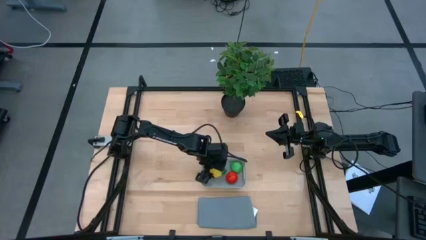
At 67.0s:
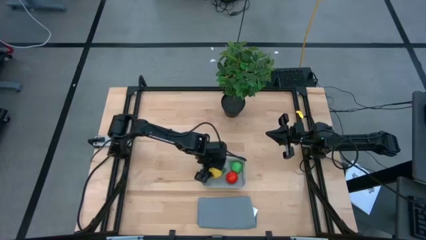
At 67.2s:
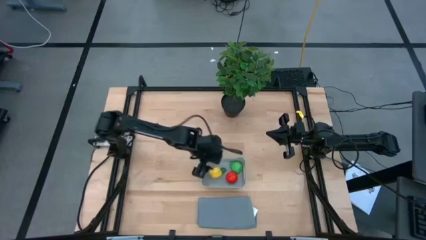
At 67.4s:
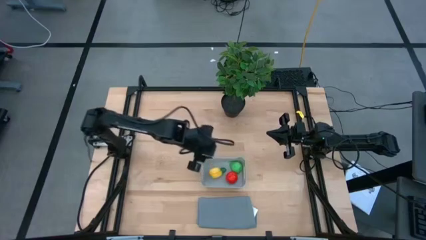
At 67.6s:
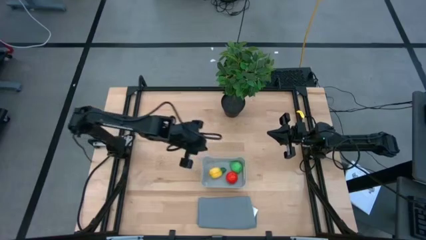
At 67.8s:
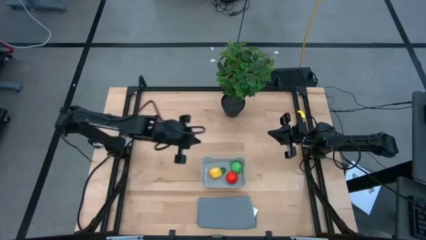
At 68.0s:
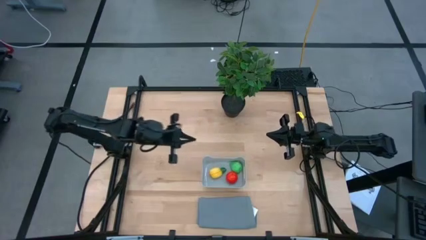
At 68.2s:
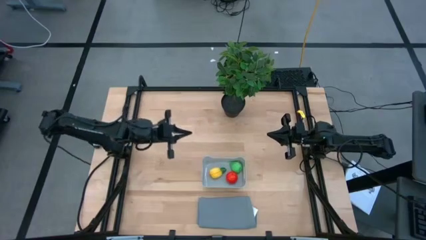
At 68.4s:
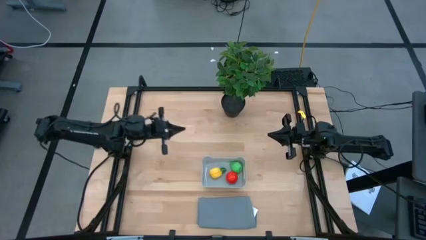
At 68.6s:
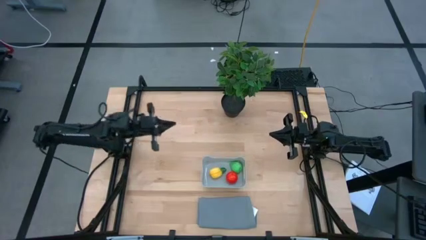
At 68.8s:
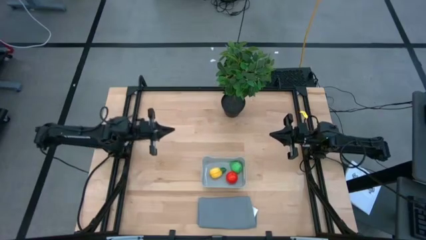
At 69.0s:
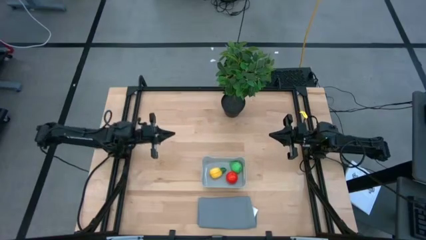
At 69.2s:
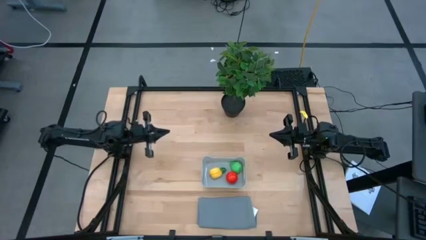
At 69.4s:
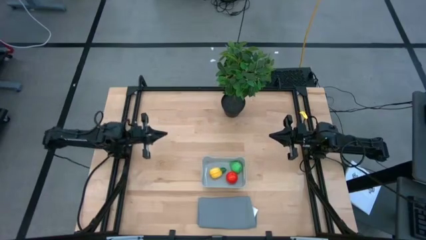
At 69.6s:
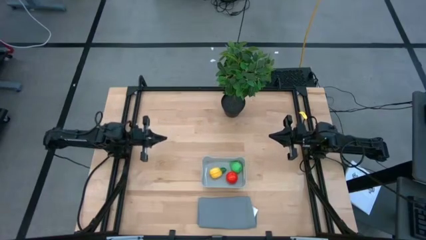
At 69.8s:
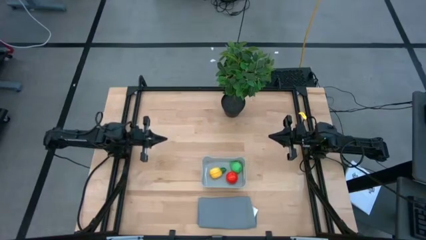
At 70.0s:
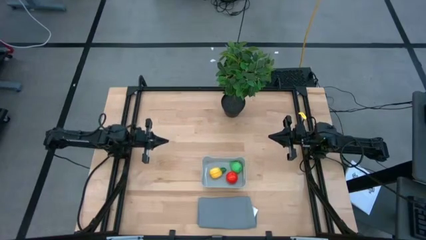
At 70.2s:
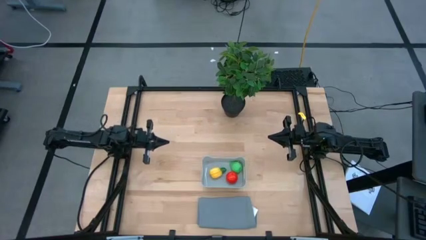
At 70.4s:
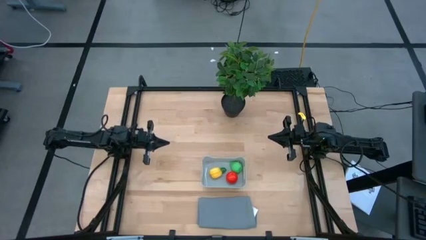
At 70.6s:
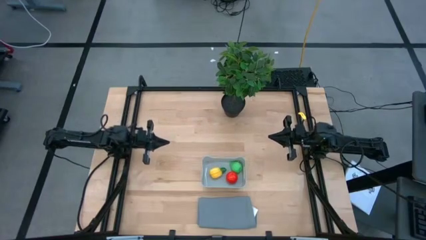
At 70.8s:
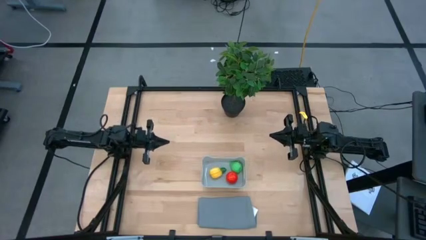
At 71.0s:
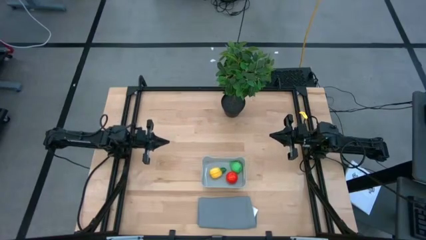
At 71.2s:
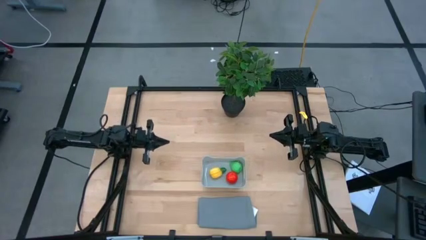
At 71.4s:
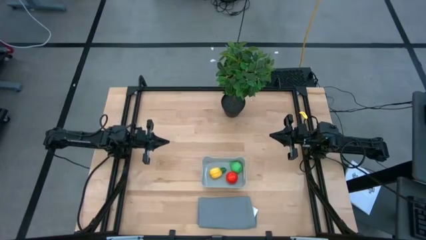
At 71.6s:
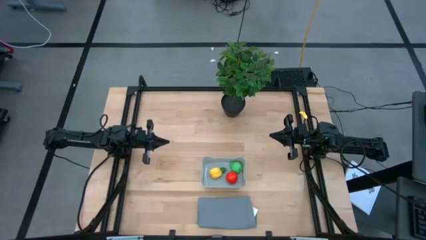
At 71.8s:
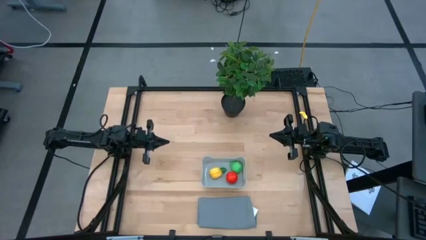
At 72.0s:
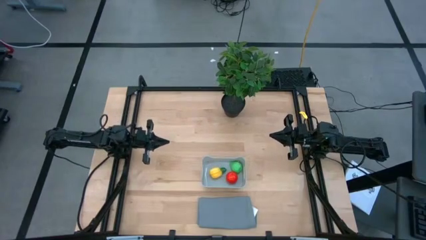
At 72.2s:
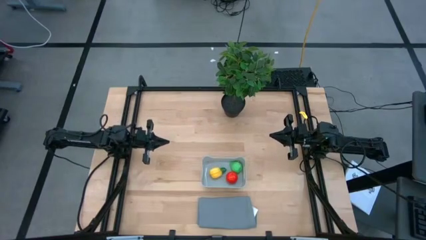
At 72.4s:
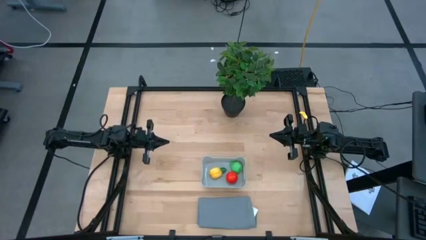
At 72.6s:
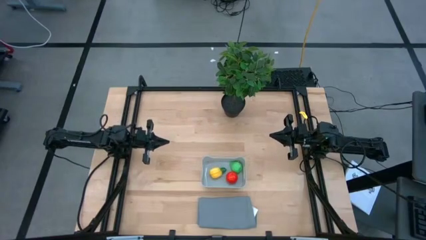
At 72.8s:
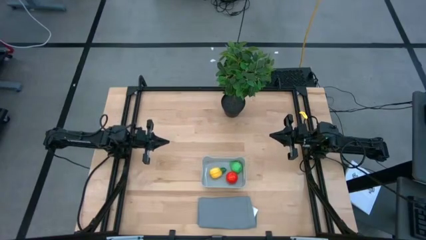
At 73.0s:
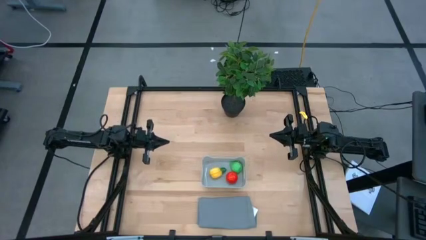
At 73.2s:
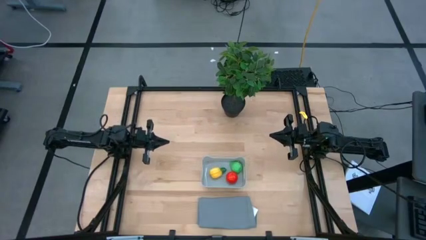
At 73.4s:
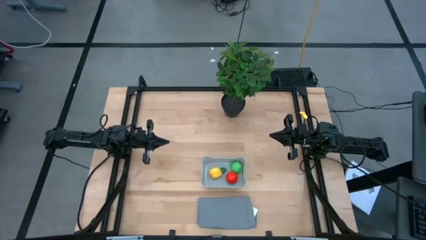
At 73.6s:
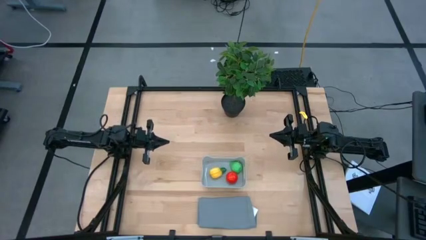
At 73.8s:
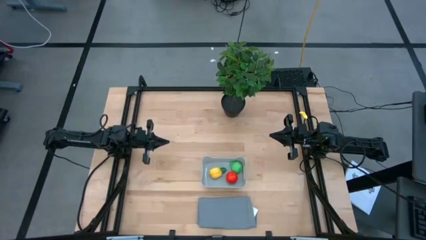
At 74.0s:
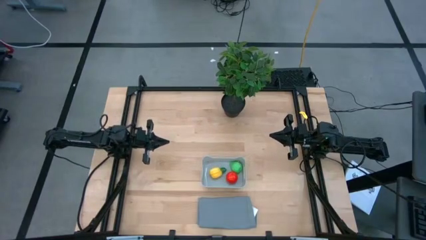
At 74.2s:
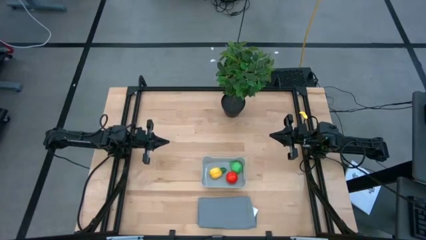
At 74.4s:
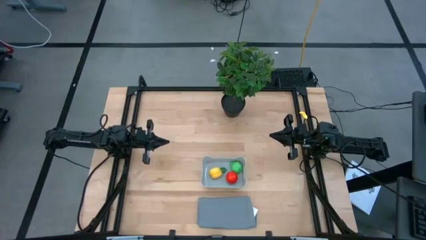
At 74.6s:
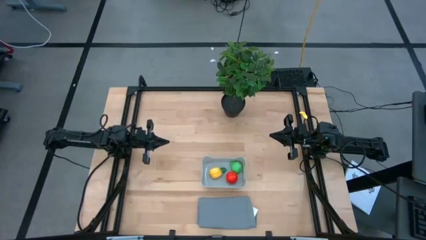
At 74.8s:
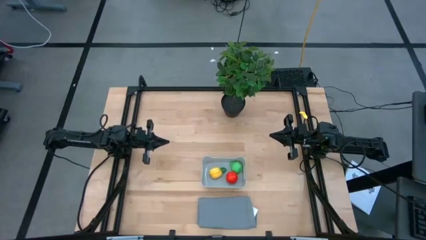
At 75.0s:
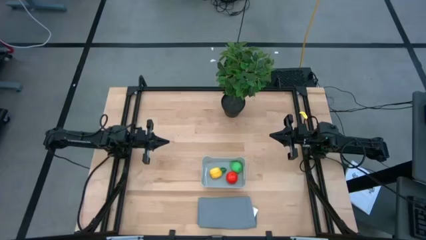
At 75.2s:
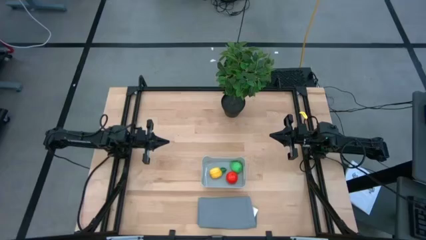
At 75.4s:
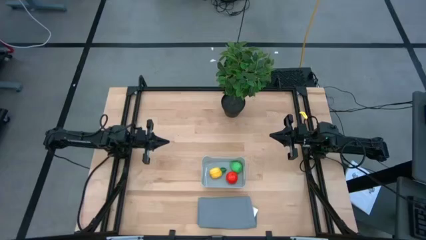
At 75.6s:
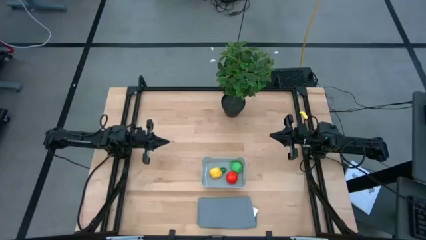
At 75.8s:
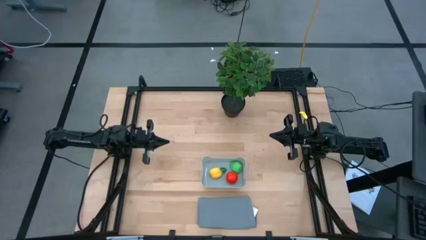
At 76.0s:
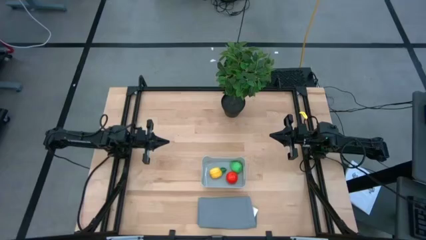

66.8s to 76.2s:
Task: Pick and placing Produce into tupperware
Return to Home Position

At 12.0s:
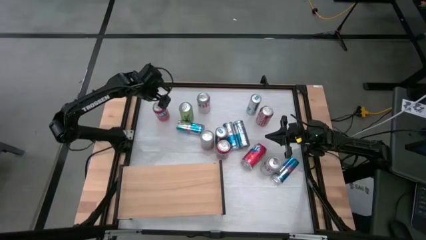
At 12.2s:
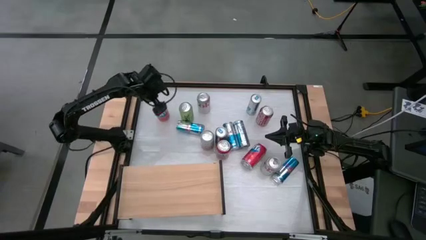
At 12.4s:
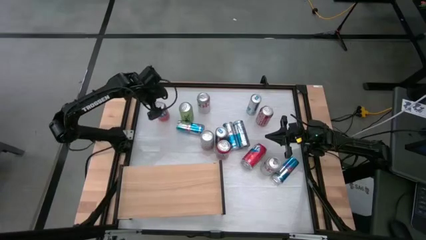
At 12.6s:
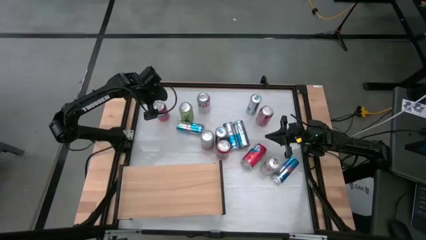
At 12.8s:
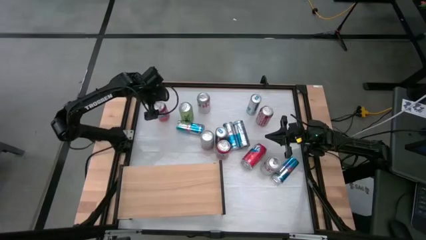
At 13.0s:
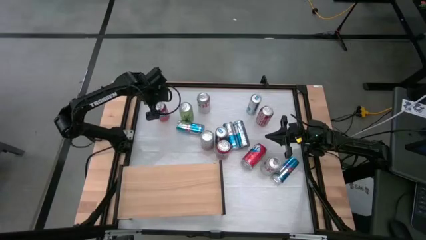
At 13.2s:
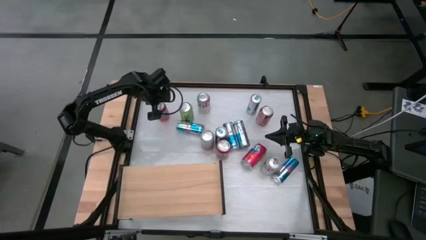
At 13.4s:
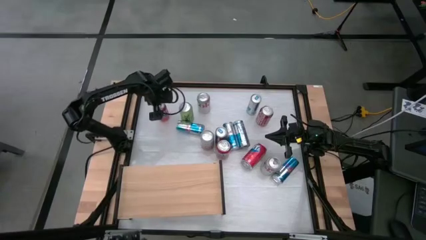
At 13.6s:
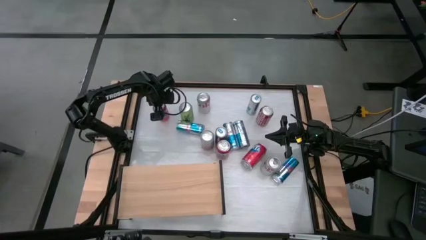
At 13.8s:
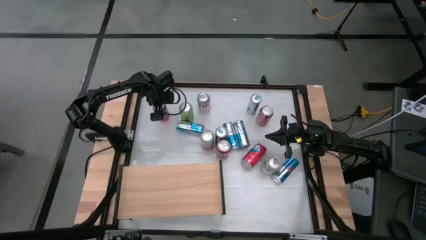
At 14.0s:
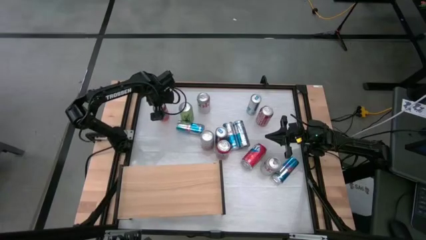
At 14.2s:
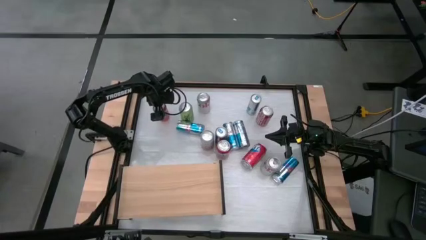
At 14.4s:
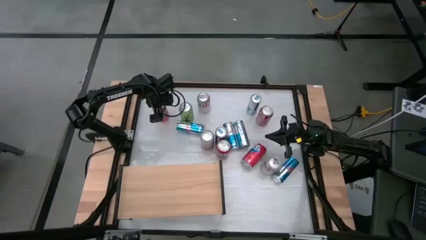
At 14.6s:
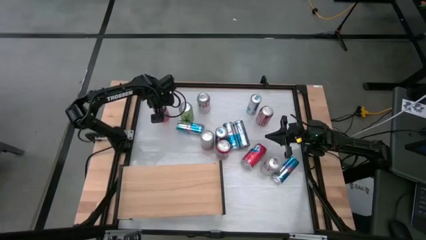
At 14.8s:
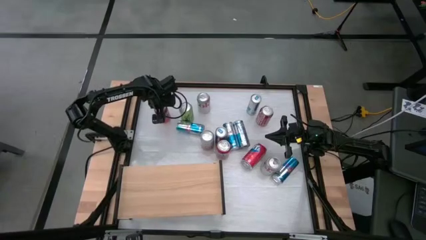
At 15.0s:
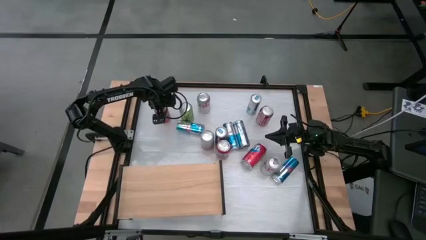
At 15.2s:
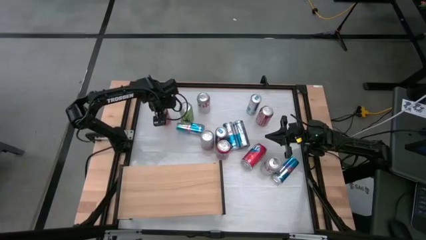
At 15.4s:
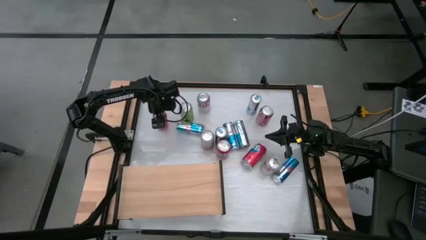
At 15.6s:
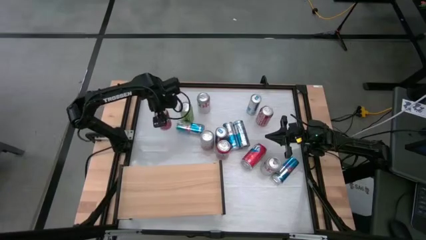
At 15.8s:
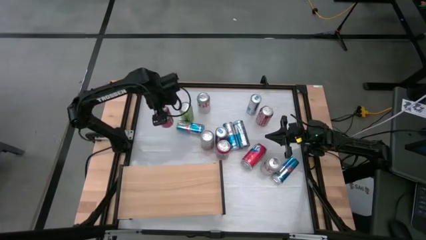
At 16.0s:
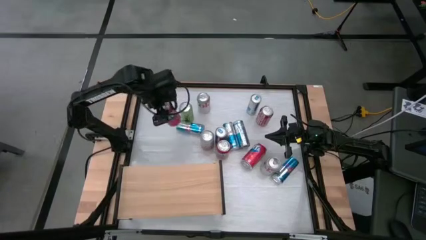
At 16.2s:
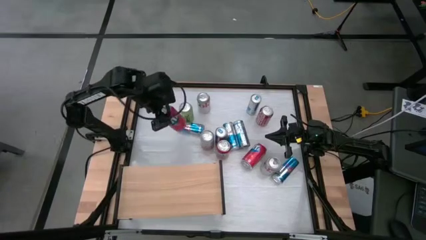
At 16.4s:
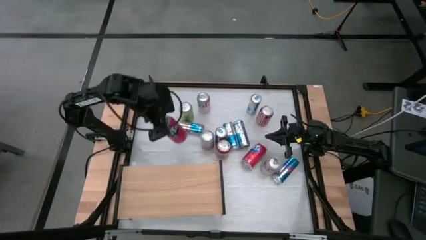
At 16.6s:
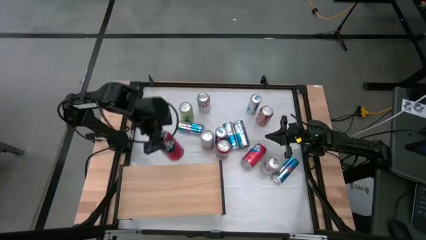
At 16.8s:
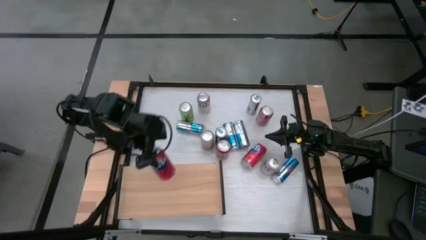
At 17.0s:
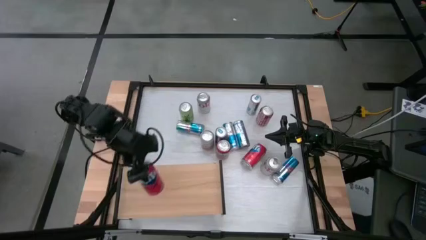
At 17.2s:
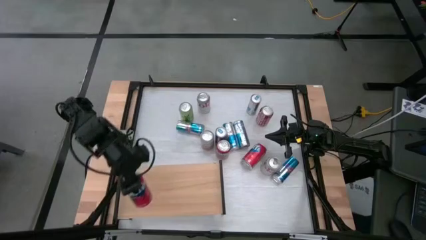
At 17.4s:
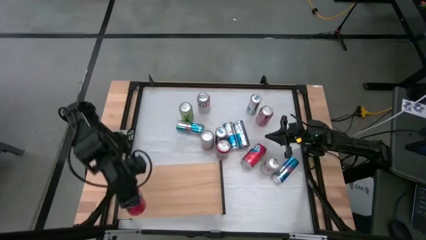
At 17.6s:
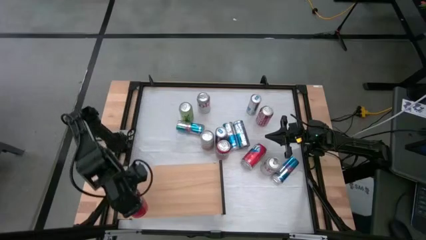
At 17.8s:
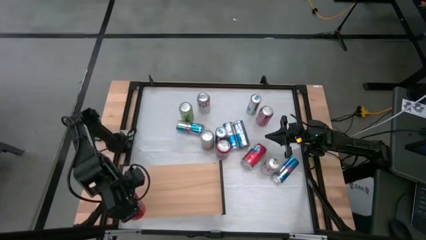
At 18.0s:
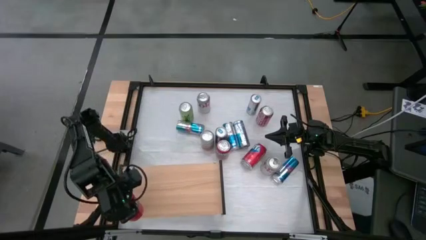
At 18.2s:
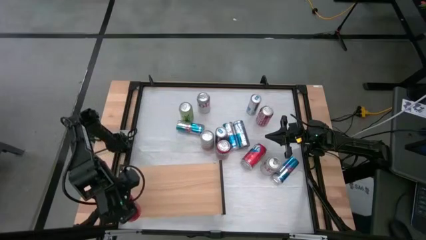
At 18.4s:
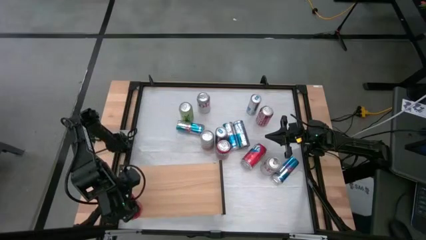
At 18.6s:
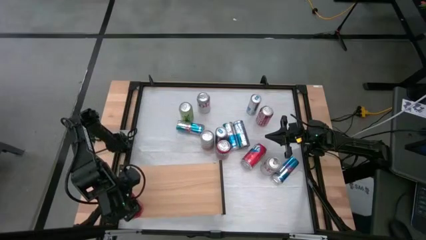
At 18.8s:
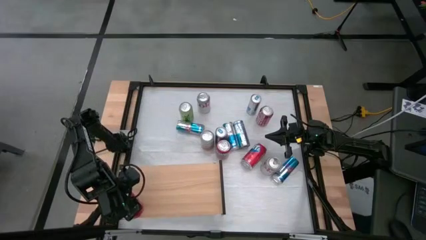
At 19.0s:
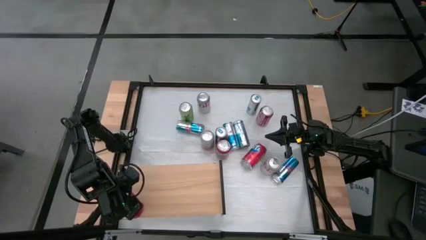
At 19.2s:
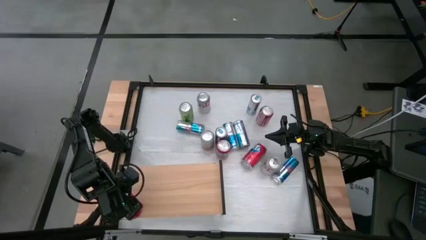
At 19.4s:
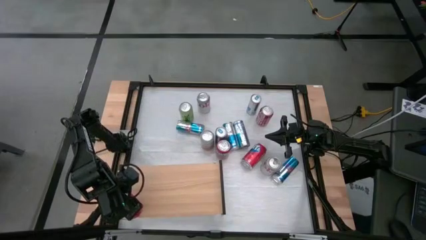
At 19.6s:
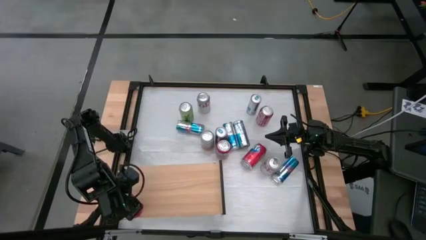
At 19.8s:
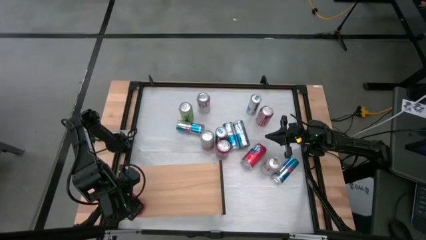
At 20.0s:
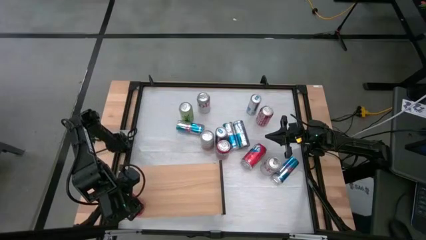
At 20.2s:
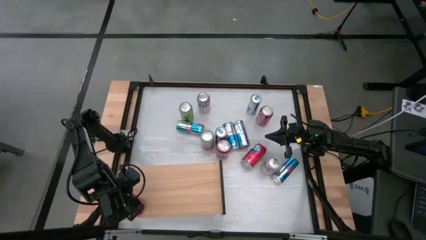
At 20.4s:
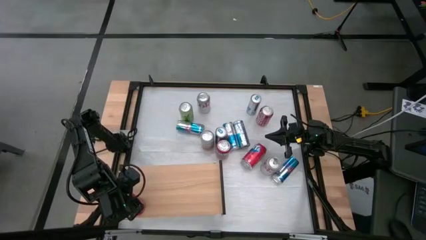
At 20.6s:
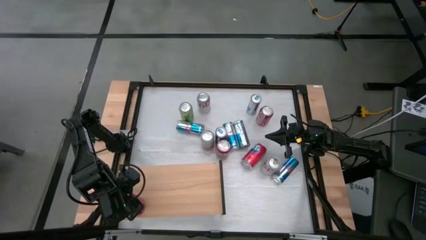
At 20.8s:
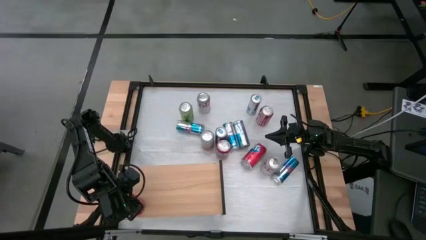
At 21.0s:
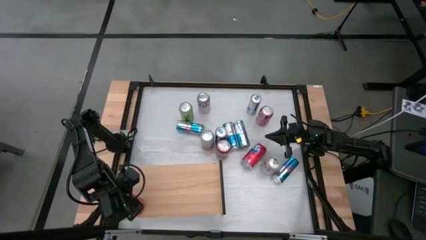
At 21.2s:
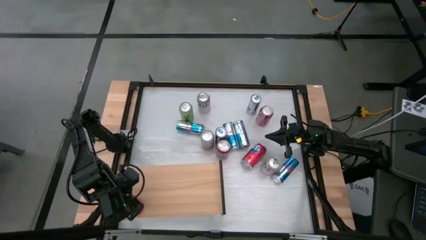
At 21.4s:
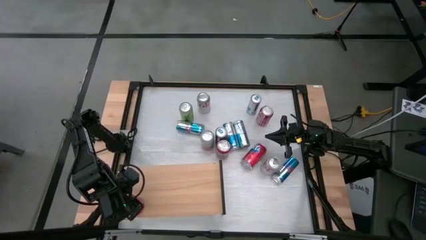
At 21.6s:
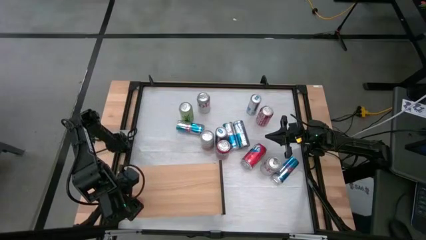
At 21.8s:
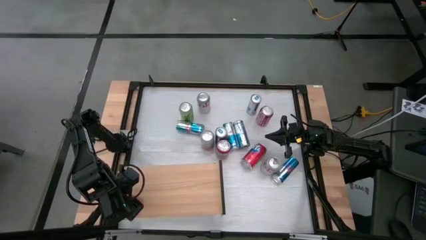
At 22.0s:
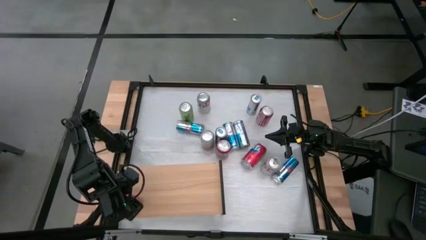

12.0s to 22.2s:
Task: Place canned beverage on shelf
Put the orange soda can on the shelf
